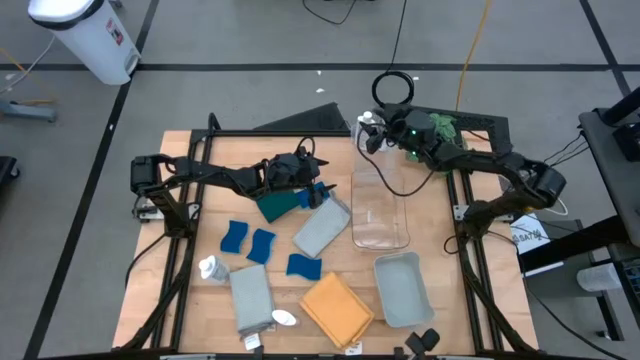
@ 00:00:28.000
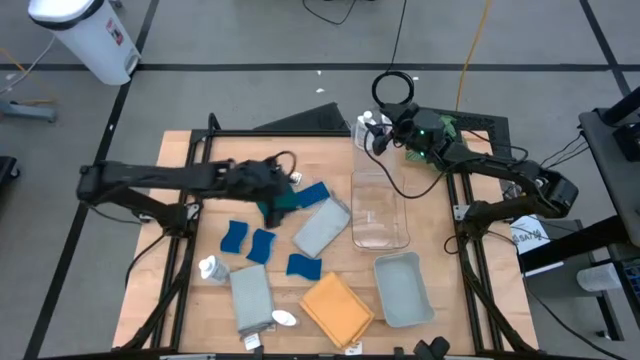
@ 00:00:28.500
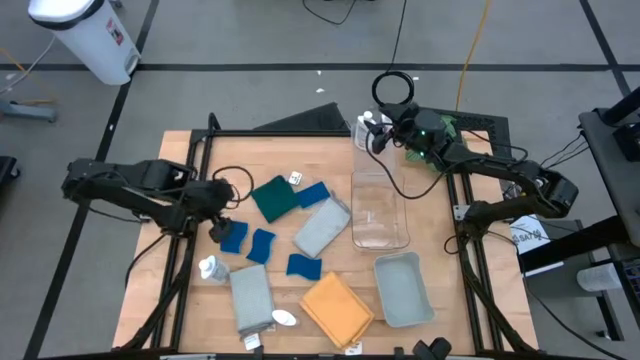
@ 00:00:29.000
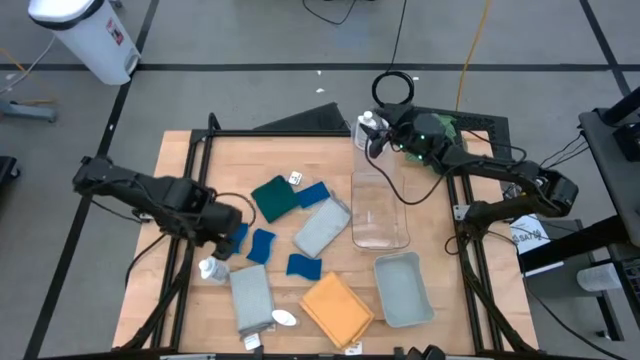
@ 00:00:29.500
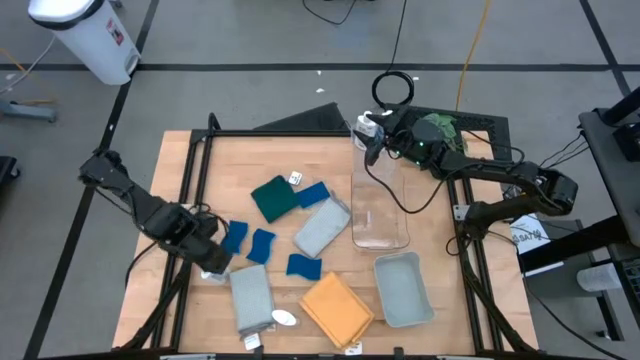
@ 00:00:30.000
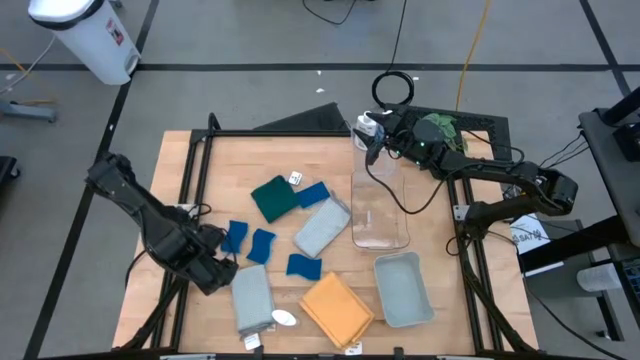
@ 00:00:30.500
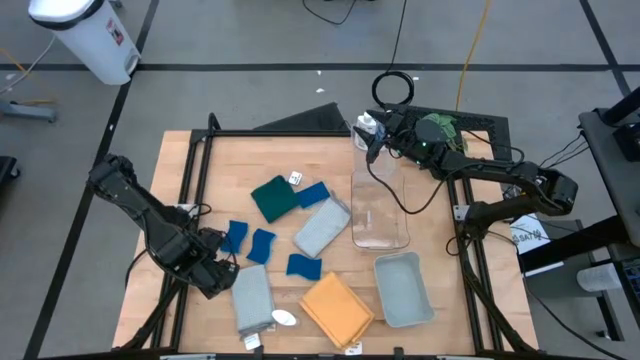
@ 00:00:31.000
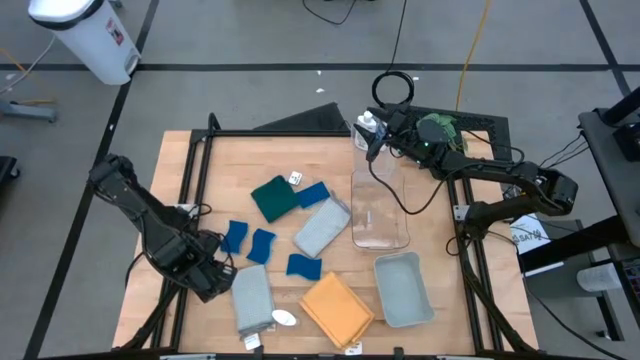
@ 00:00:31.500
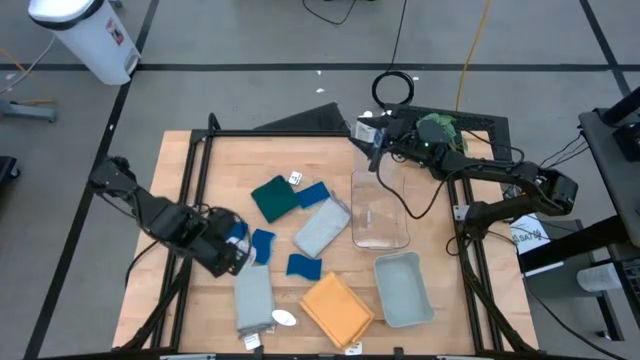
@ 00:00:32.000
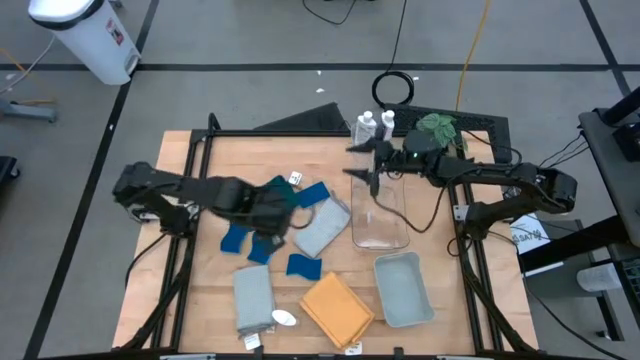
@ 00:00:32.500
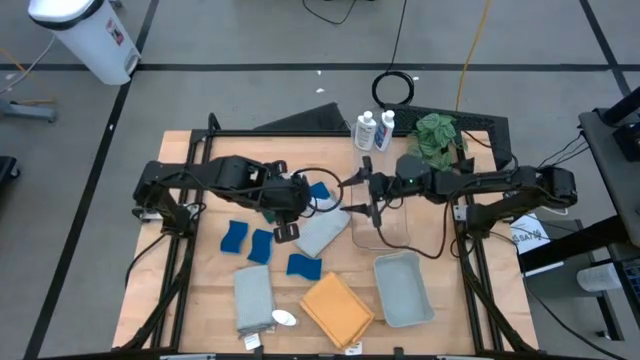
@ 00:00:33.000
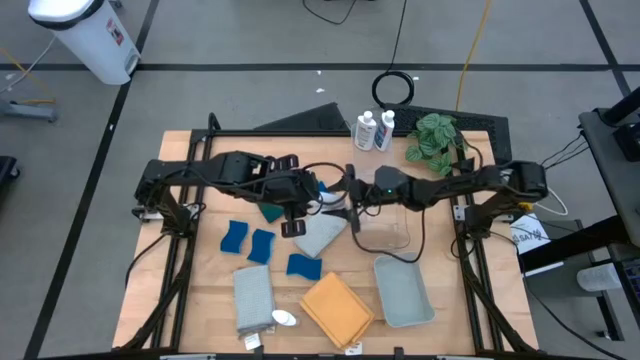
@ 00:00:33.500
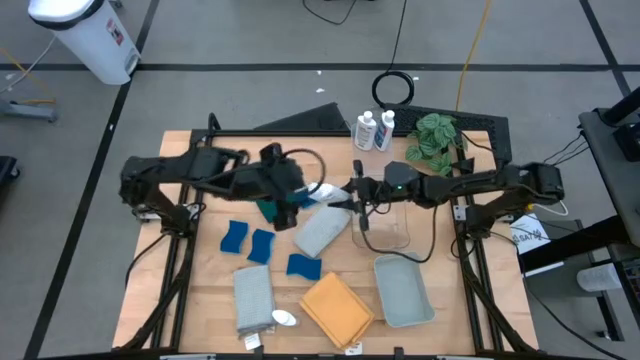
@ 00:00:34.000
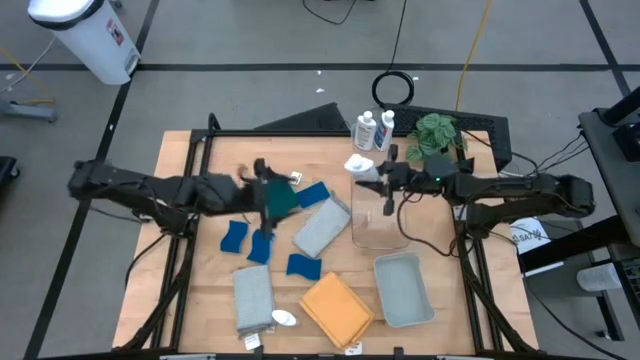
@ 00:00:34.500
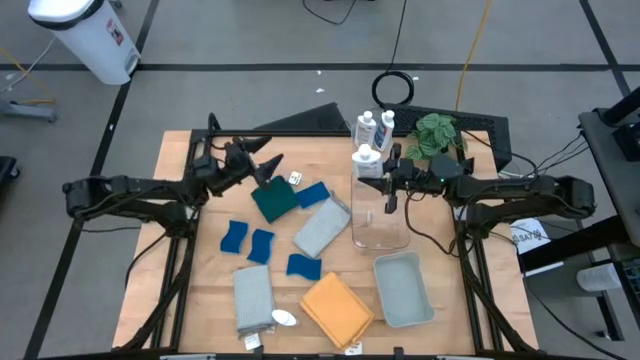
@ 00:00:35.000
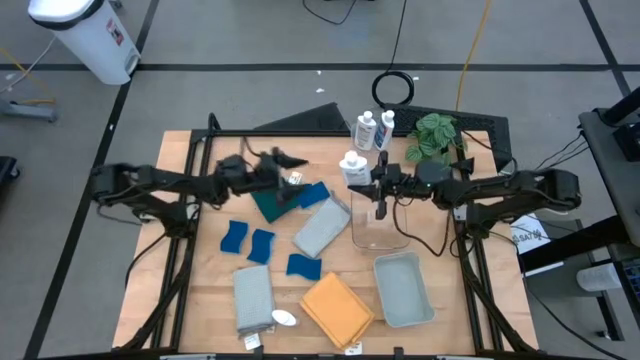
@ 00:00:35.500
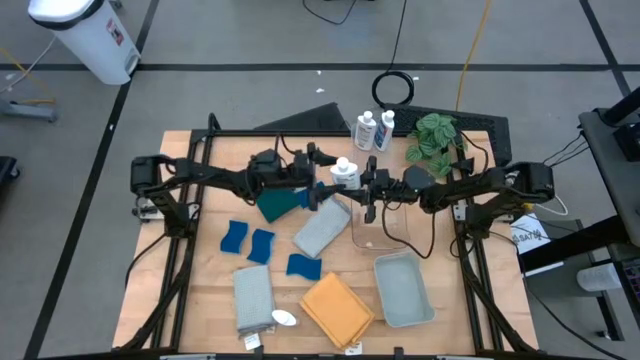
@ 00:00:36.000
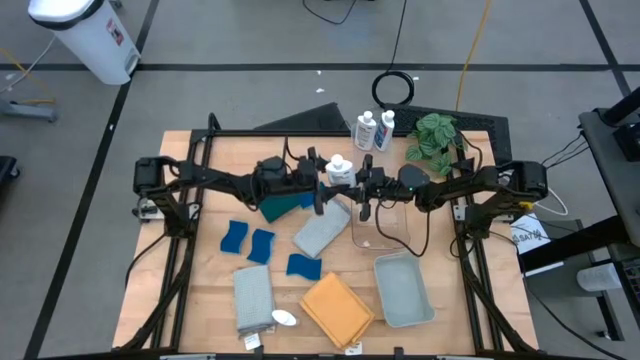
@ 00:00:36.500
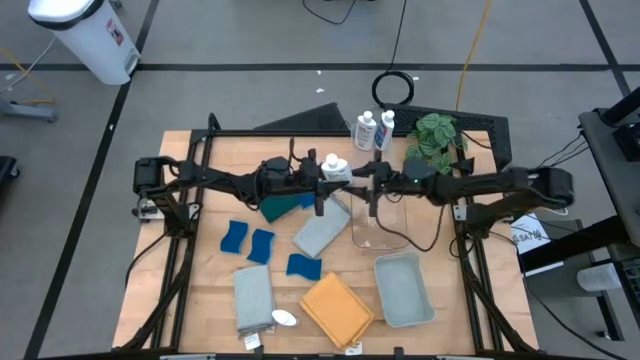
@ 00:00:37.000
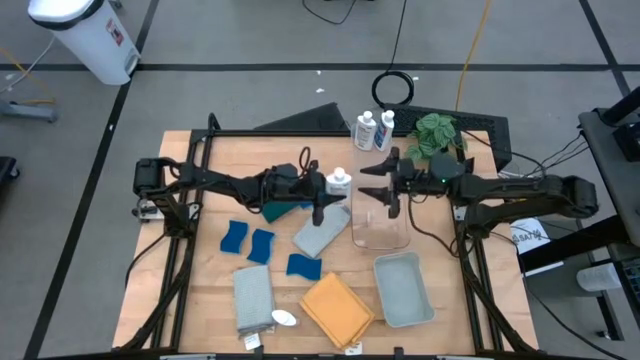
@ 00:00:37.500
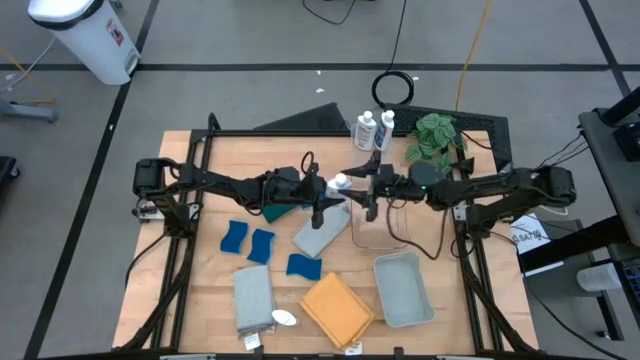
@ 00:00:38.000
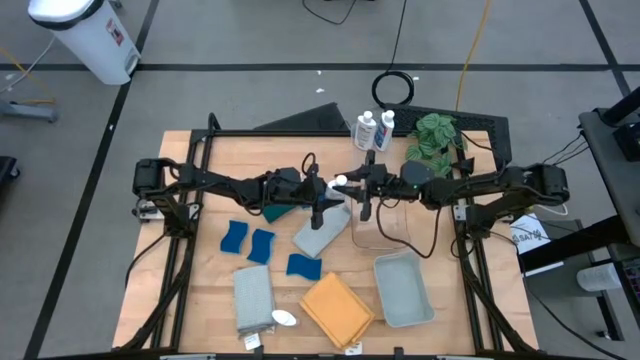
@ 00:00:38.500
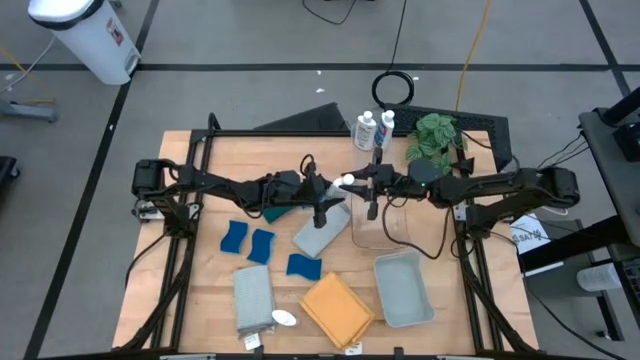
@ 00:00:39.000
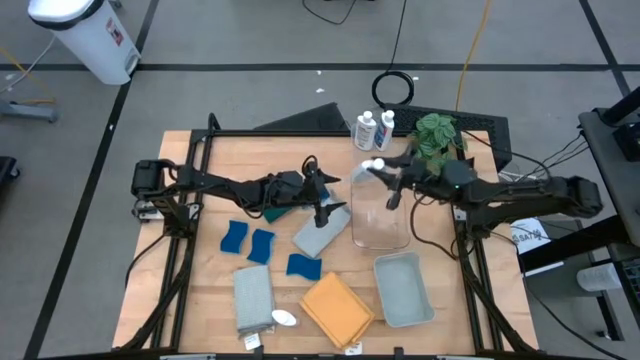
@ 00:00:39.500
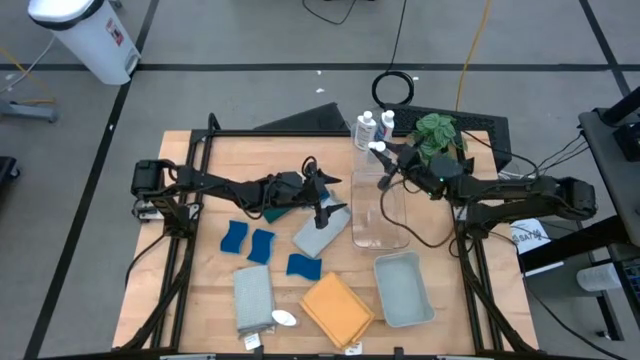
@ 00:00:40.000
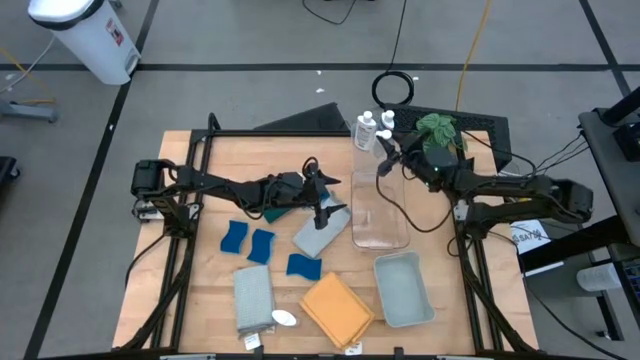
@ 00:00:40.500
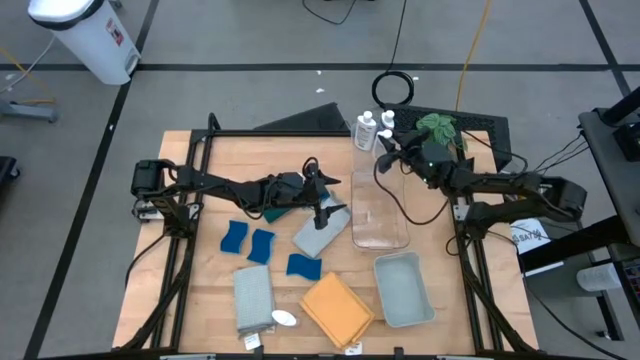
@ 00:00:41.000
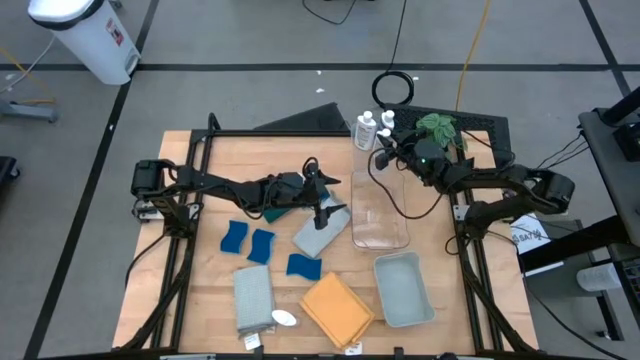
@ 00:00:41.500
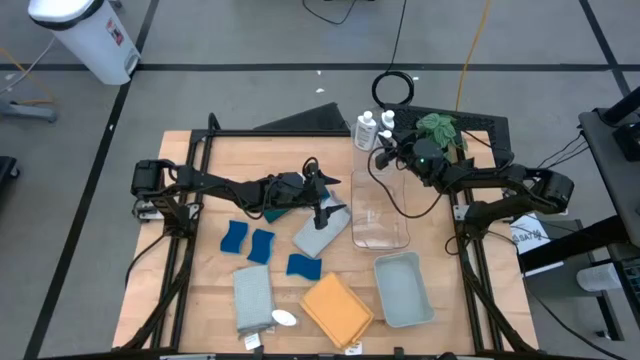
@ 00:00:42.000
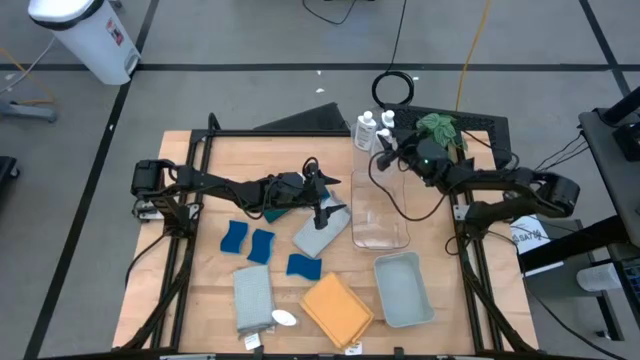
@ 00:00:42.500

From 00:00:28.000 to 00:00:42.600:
Task: Pick & Place Kitchen Items
Put the white plastic restorer bottle into the top transparent bin

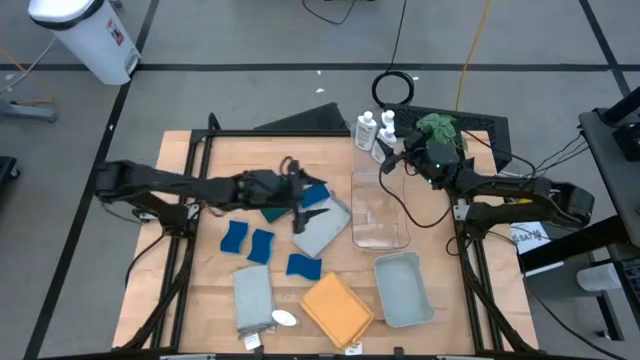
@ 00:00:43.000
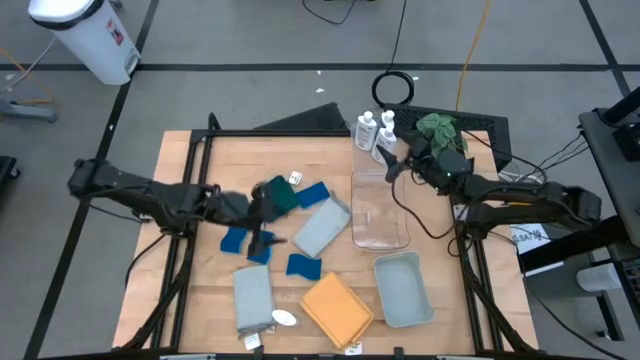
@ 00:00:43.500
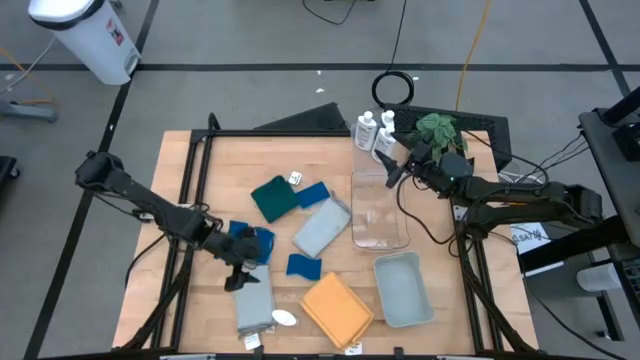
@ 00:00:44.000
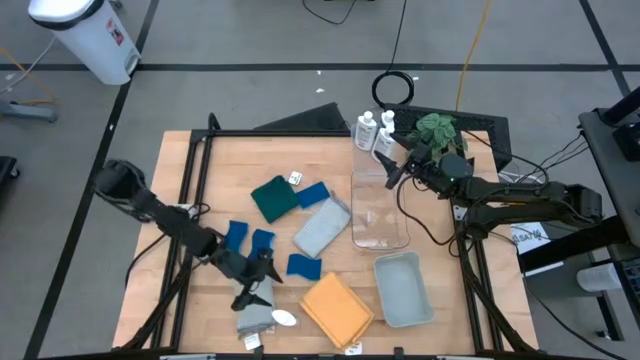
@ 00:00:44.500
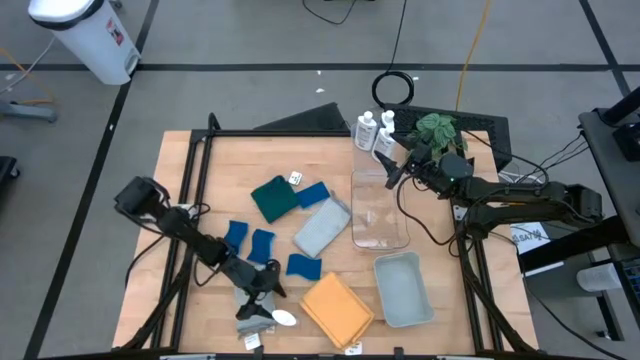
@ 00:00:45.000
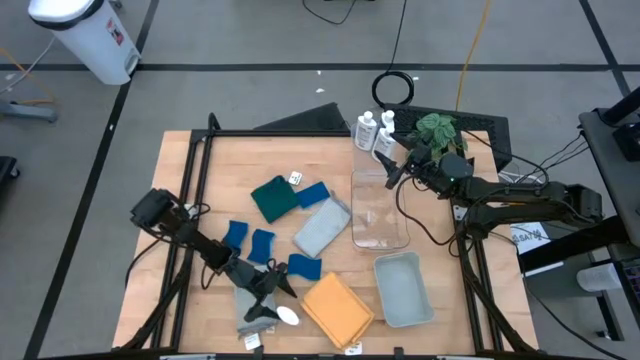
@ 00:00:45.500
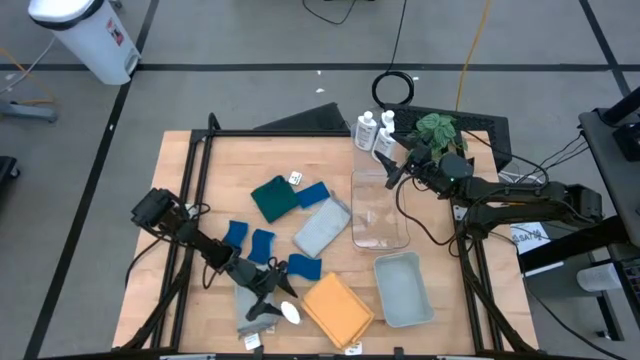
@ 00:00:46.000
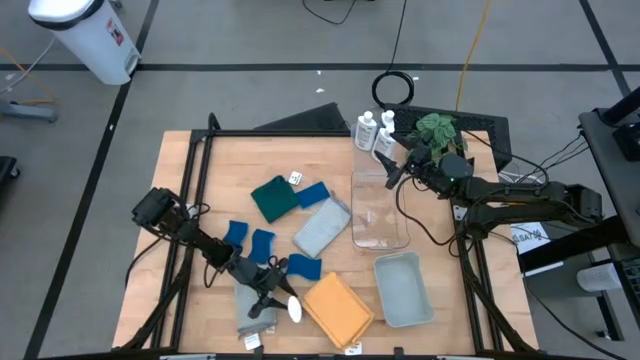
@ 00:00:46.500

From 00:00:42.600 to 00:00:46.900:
Put the white plastic restorer bottle into the top transparent bin

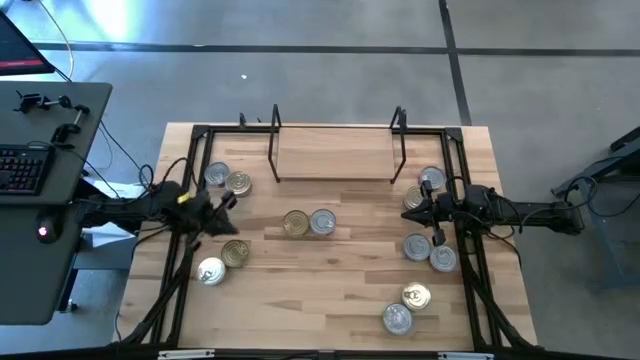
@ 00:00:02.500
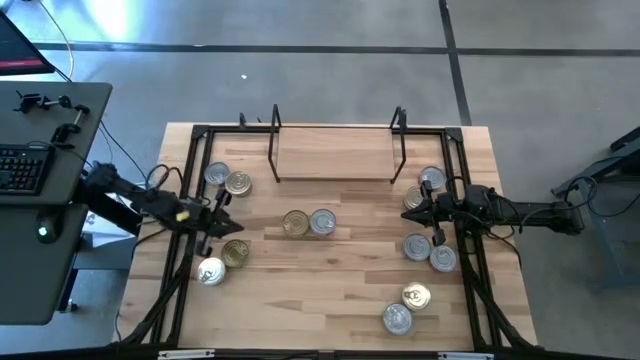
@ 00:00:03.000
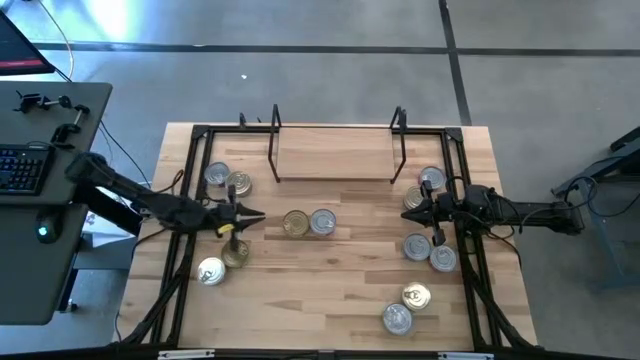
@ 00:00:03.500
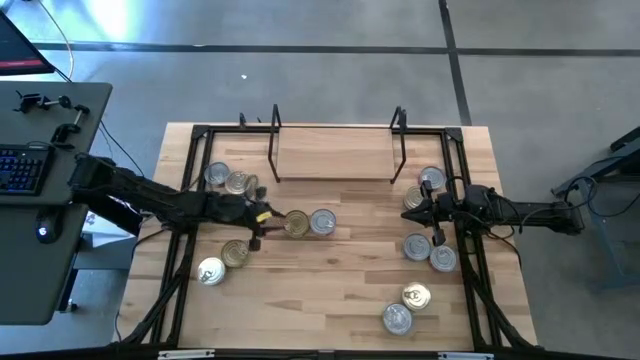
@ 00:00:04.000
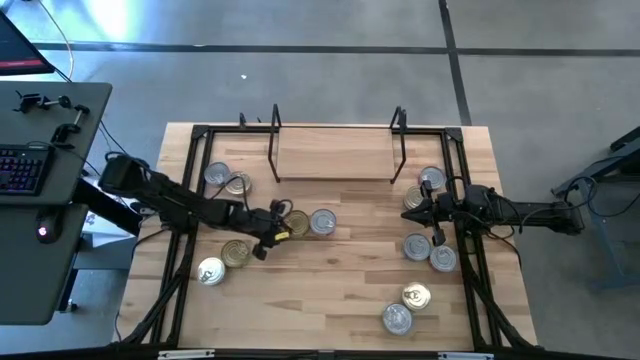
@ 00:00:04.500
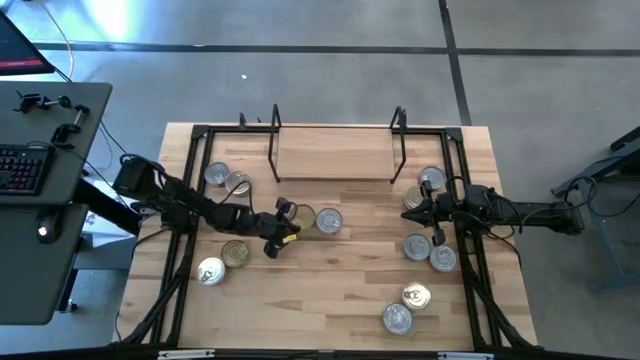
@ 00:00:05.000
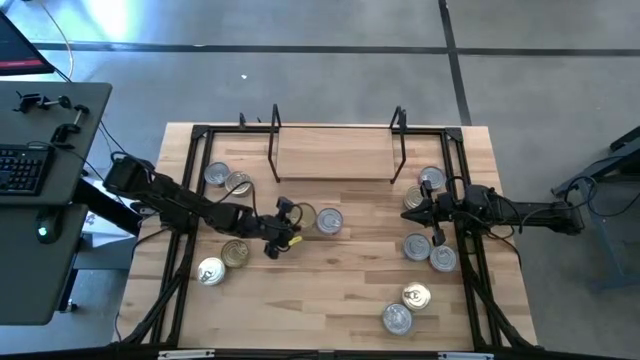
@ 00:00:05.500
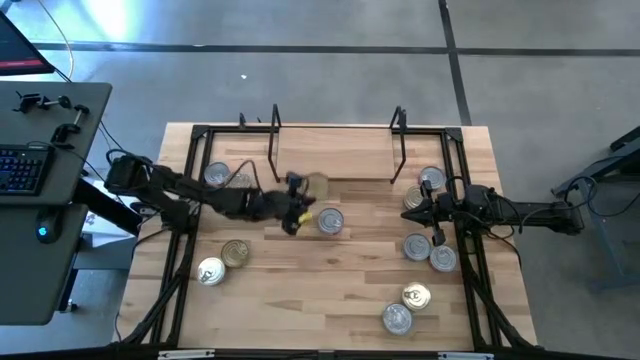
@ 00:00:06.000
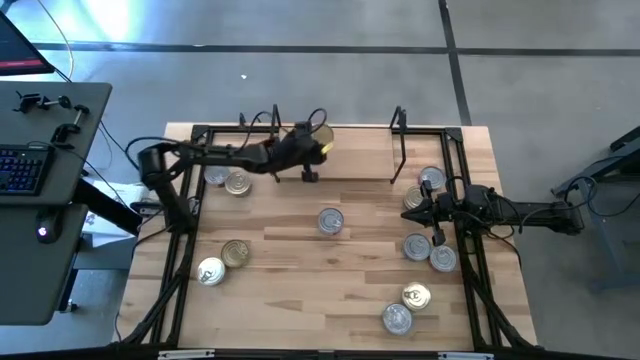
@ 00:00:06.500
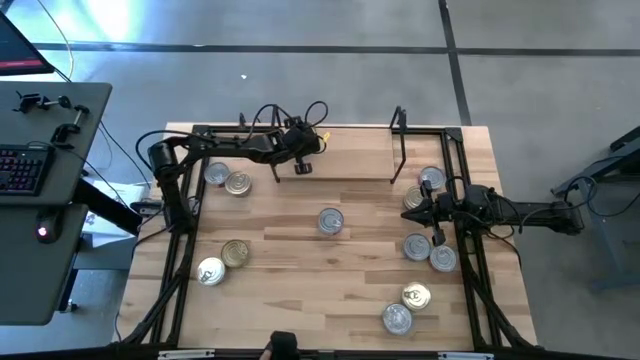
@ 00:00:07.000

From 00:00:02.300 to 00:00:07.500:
Task: Stack canned seafood by type on shelf
Put the green tuna can on the shelf
